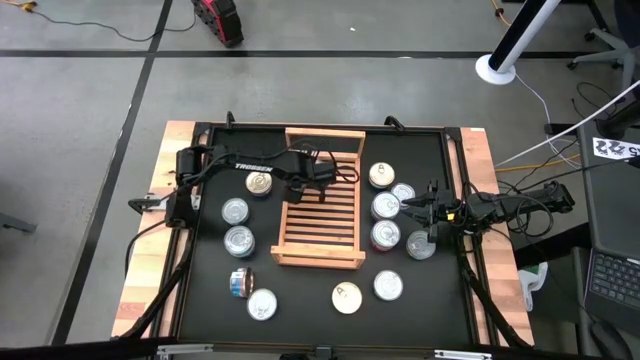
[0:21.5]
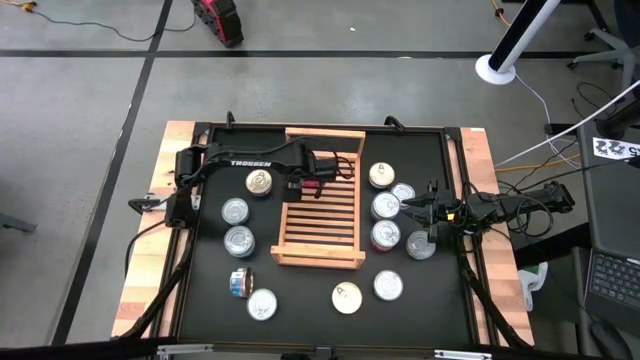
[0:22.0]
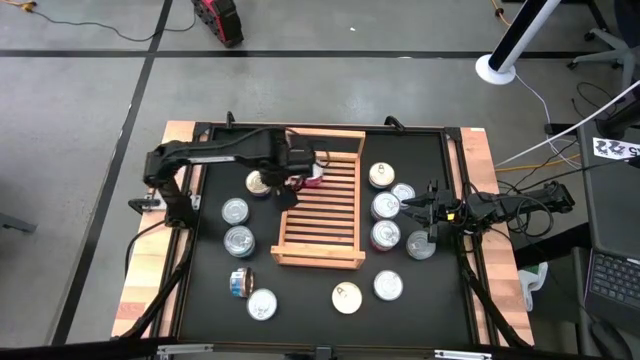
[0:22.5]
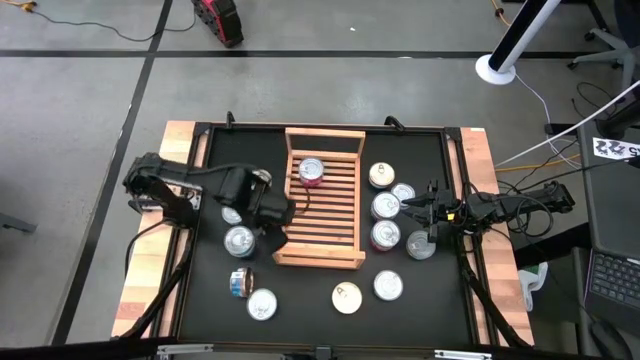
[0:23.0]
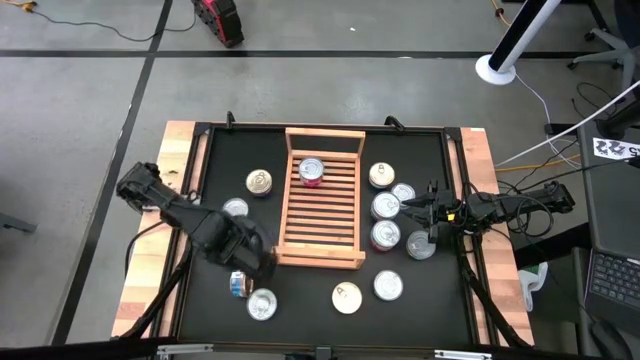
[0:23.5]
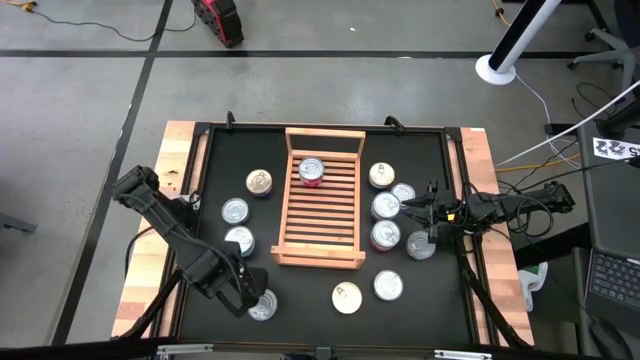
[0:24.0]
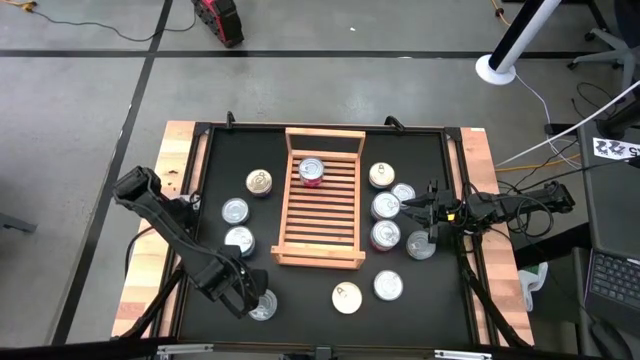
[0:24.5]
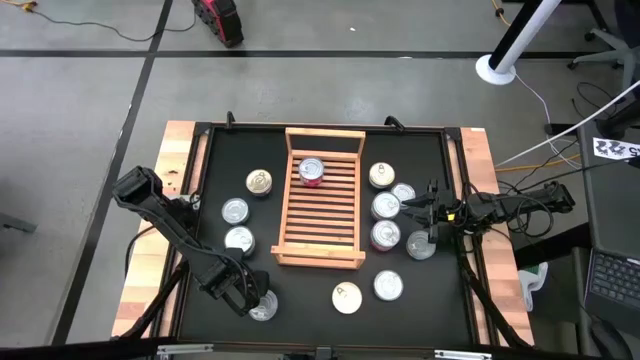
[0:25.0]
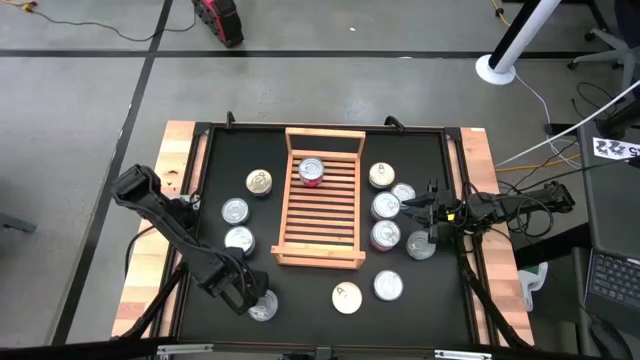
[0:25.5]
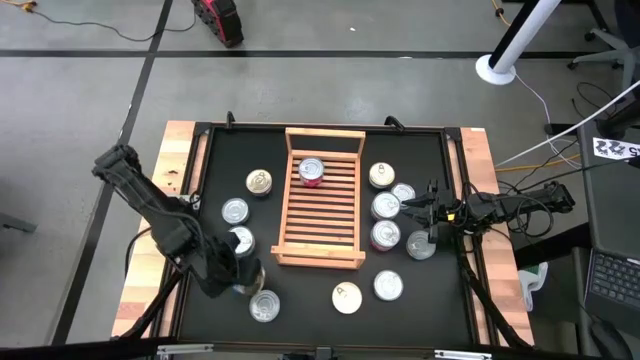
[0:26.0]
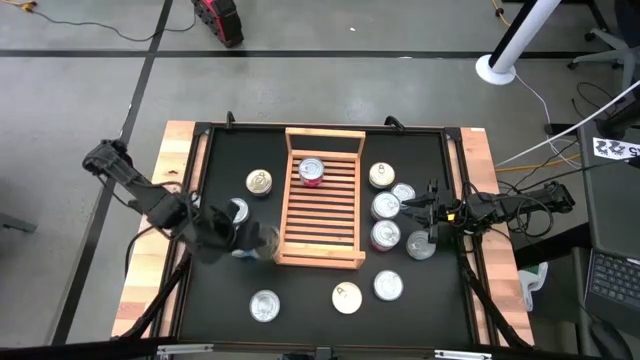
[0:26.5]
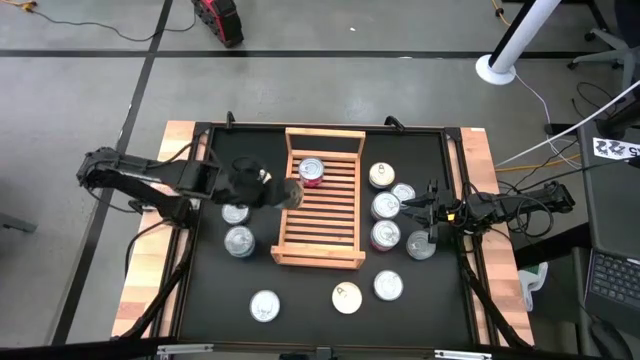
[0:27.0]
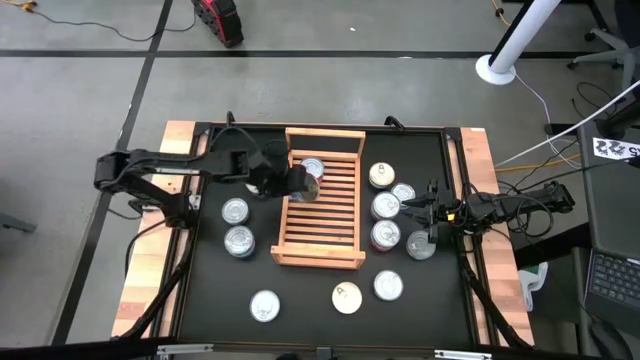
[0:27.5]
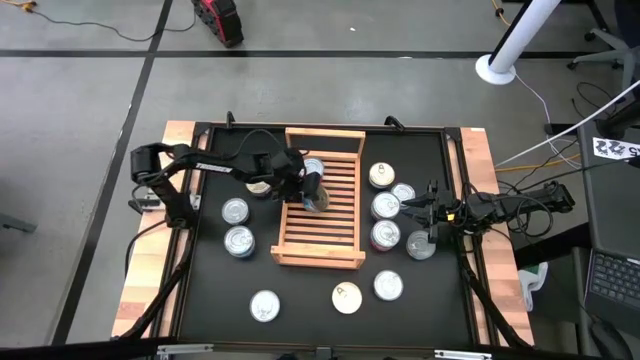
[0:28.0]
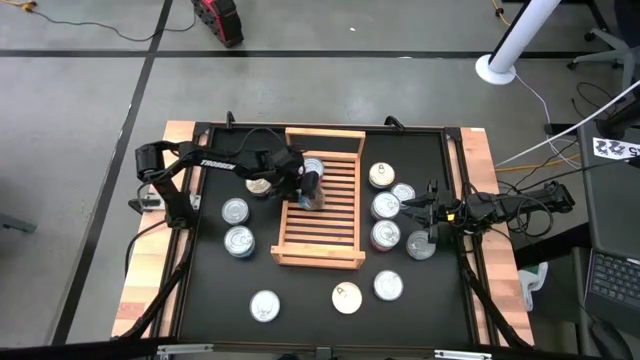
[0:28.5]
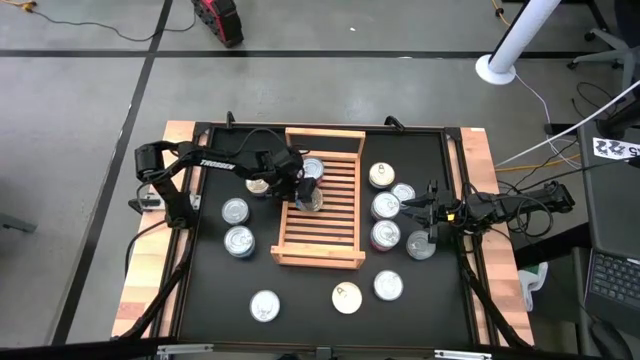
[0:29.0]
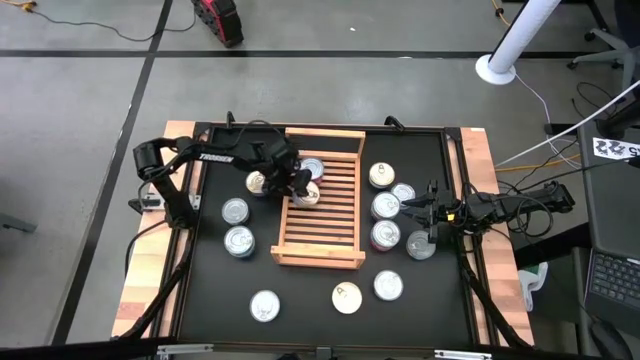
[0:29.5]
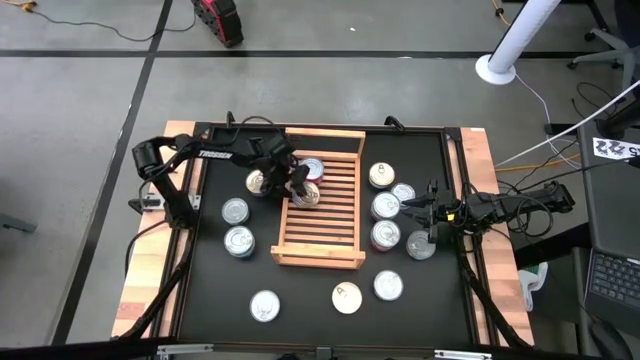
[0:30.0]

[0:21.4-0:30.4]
Task: Stack canned seafood by type on shelf
Put the blue-pink tuna can on the shelf

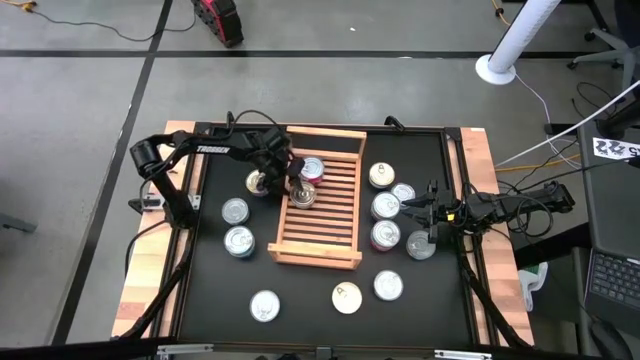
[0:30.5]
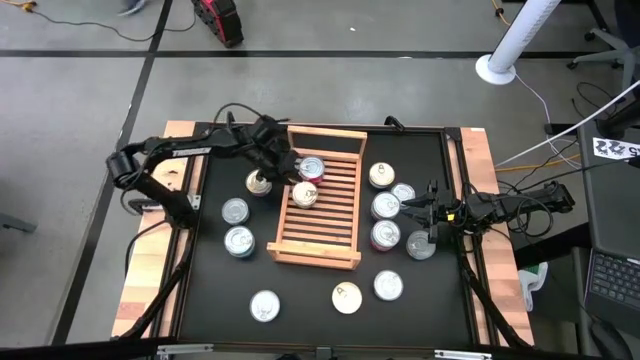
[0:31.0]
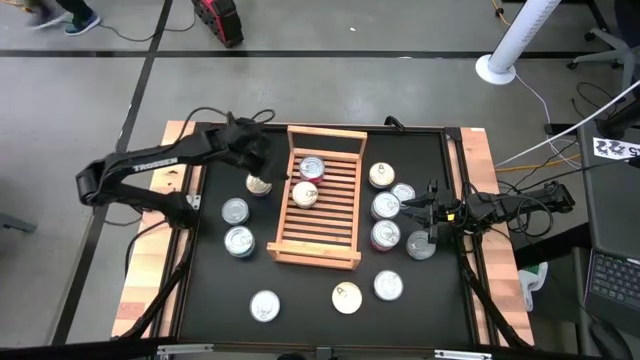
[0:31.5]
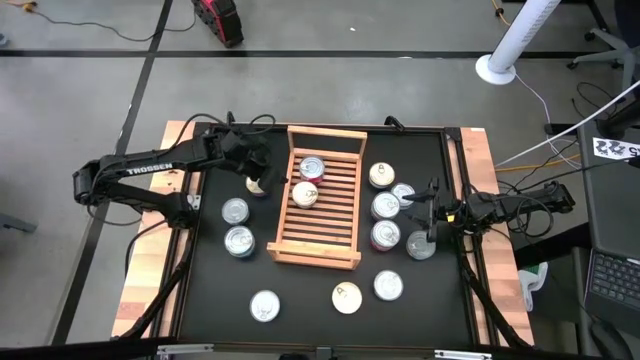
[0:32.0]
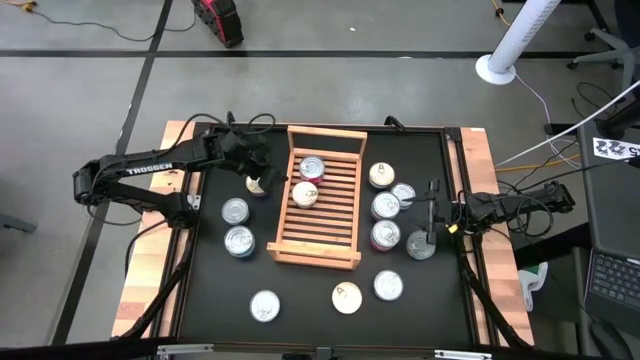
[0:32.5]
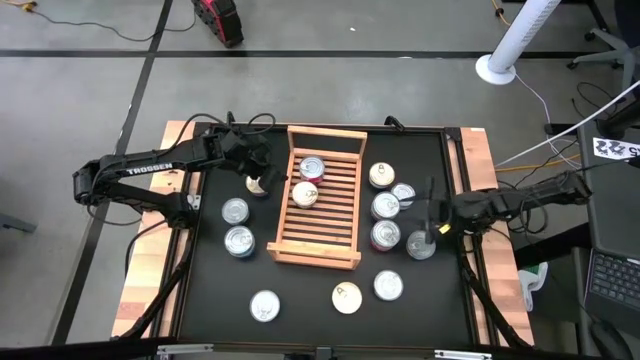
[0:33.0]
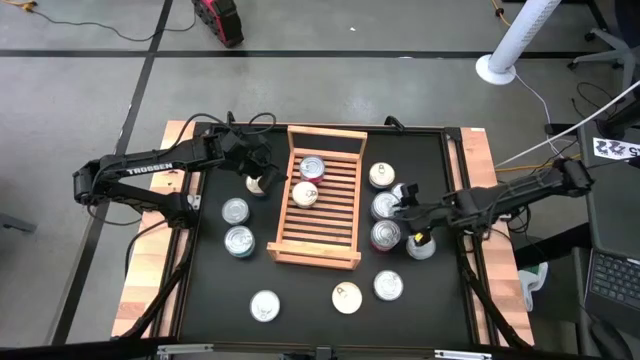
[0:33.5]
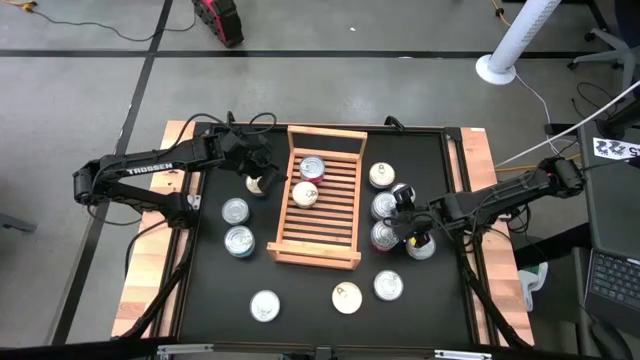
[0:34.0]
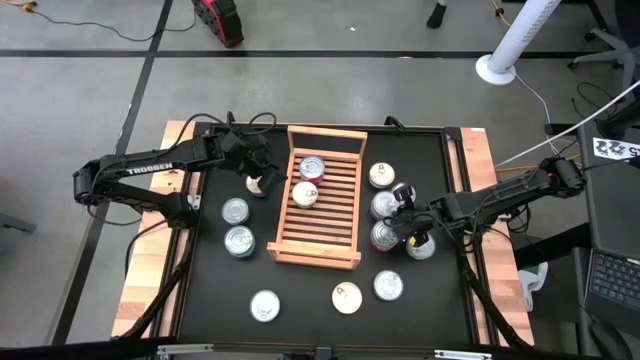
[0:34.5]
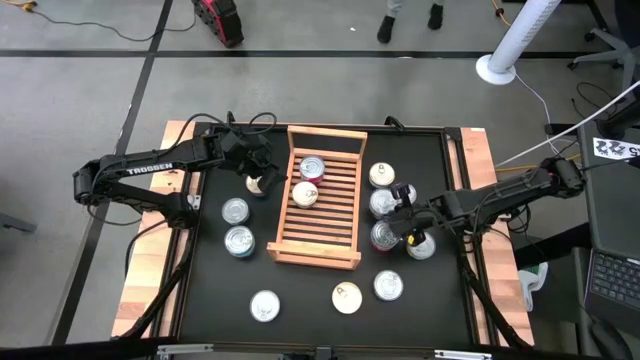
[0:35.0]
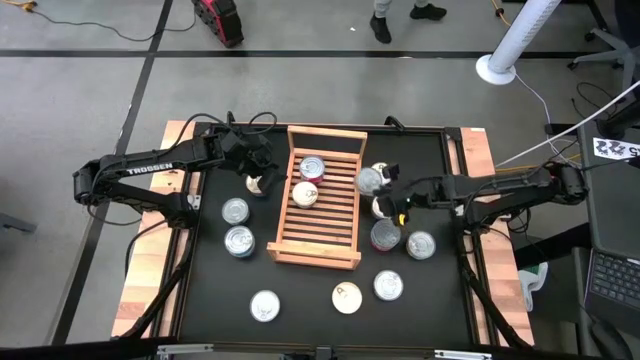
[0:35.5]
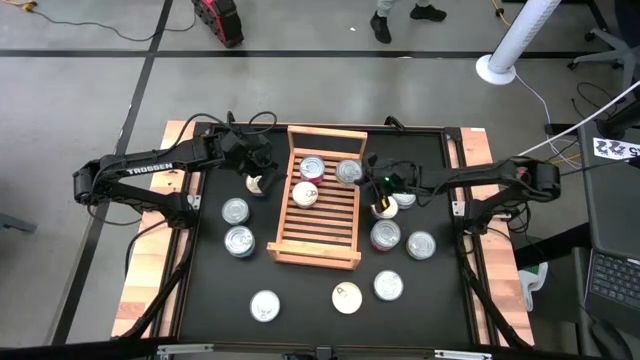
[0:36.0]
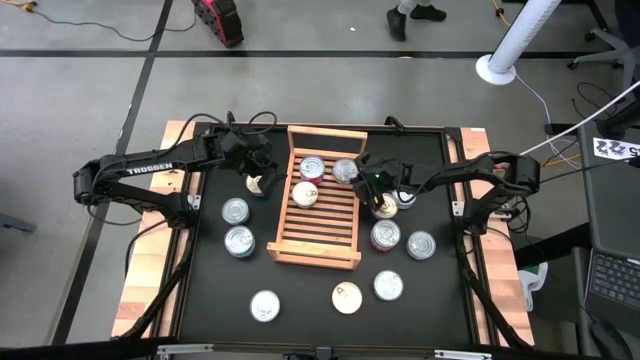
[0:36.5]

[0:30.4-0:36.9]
Put the yellow-blue tuna can on the shelf

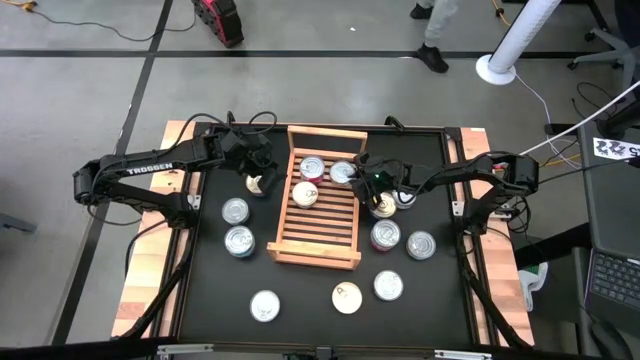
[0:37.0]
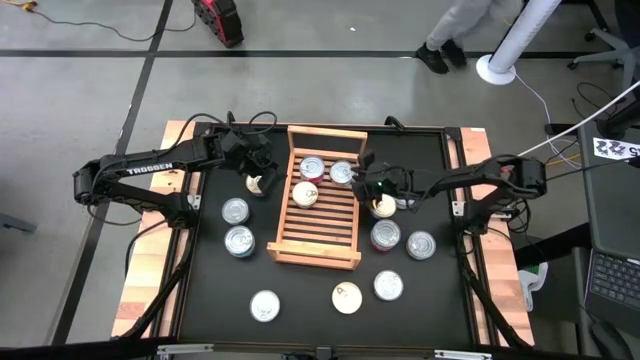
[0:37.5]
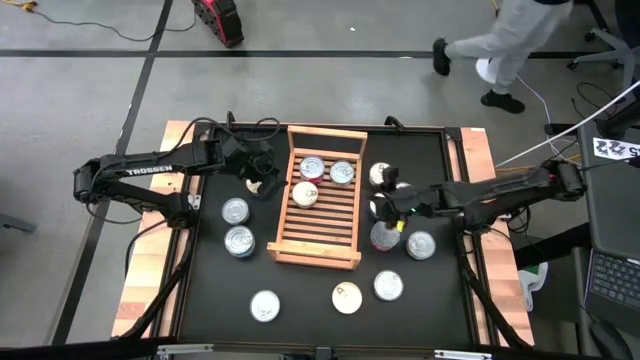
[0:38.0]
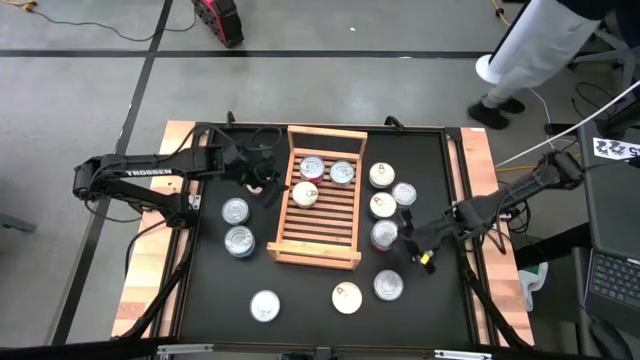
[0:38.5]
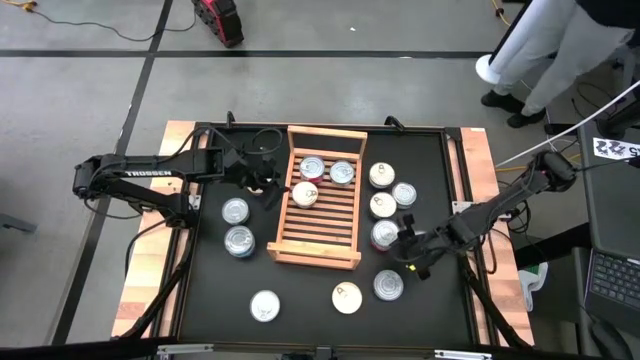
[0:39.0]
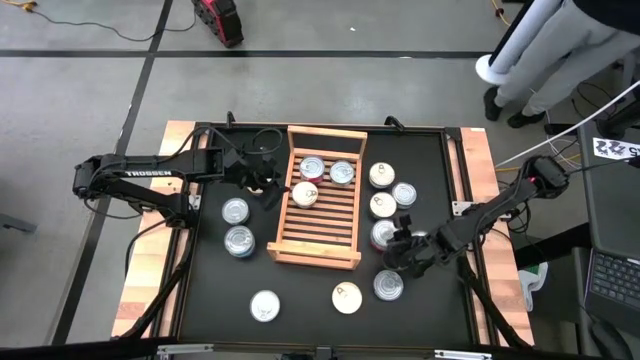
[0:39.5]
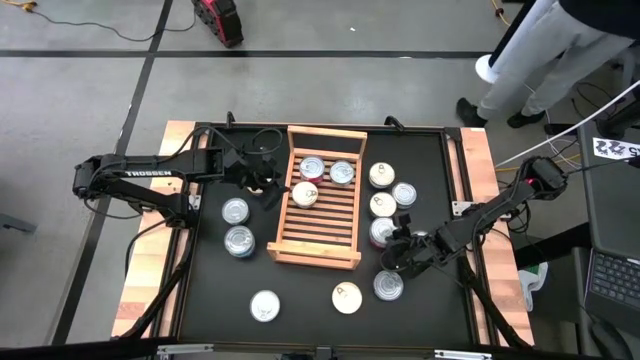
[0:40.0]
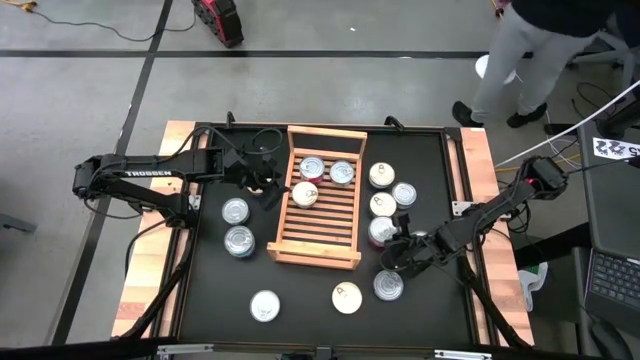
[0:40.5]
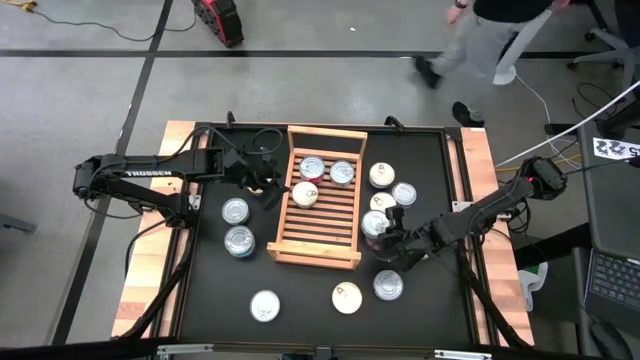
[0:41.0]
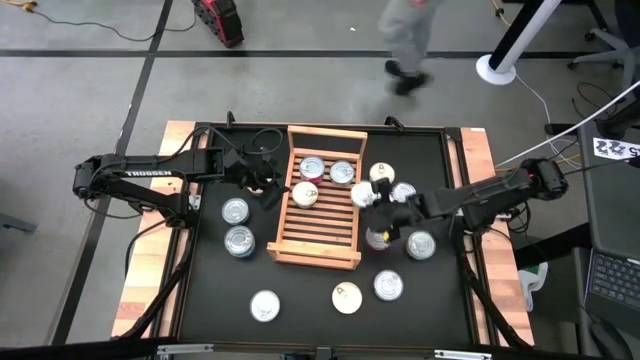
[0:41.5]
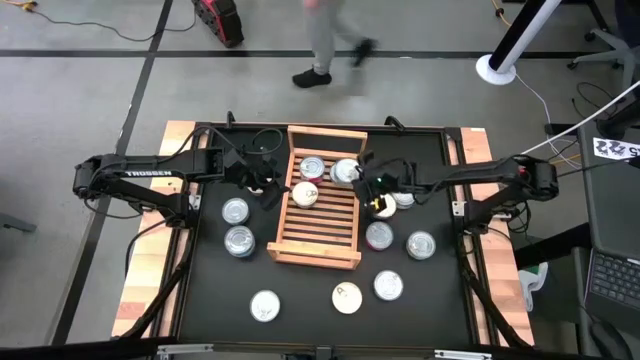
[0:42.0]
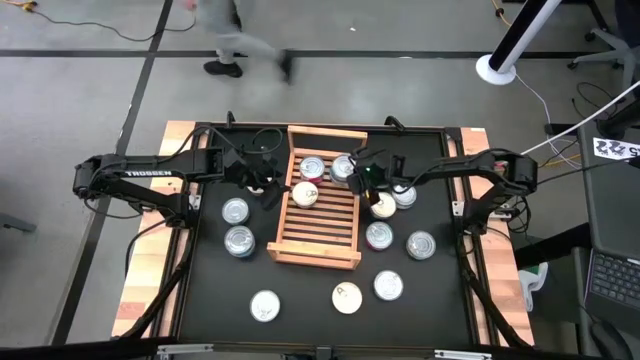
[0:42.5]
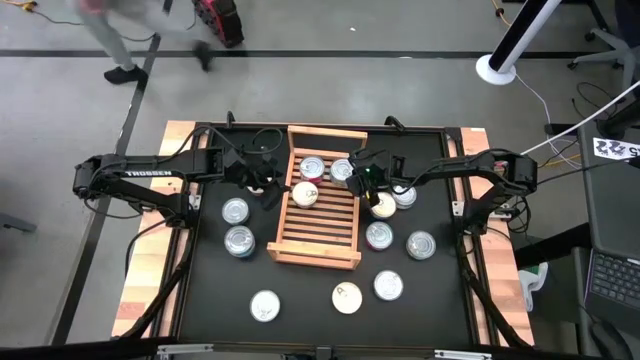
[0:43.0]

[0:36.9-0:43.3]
Stack the yellow-blue tuna can on top of the other yellow-blue tuna can on the shelf
